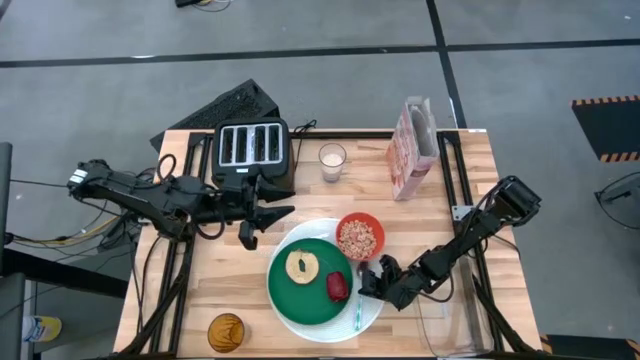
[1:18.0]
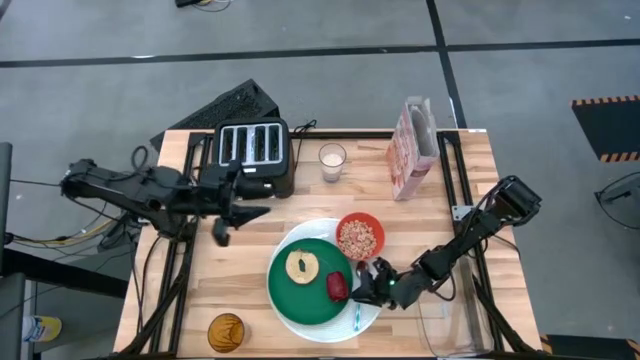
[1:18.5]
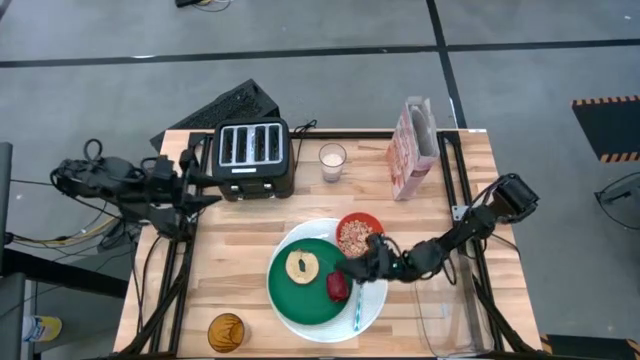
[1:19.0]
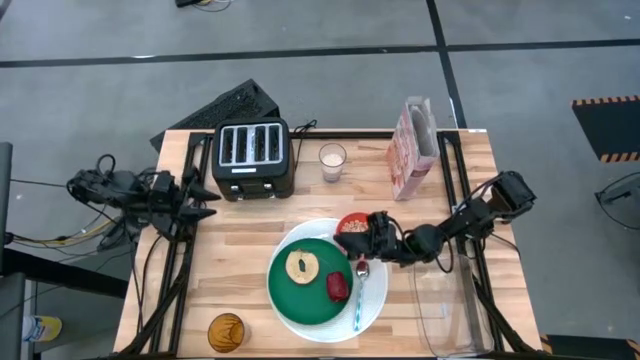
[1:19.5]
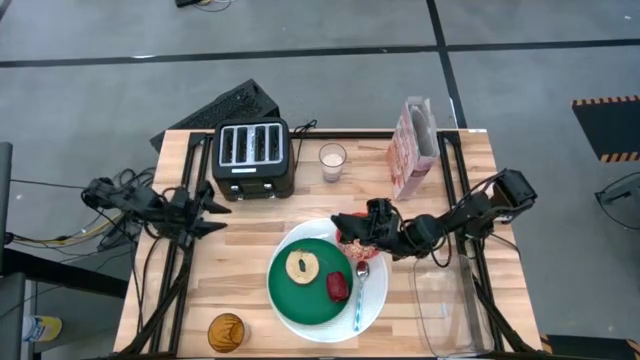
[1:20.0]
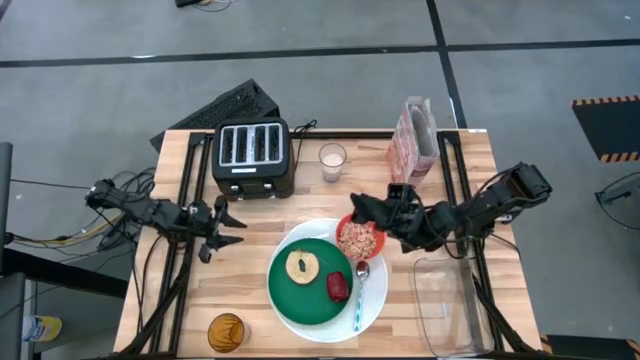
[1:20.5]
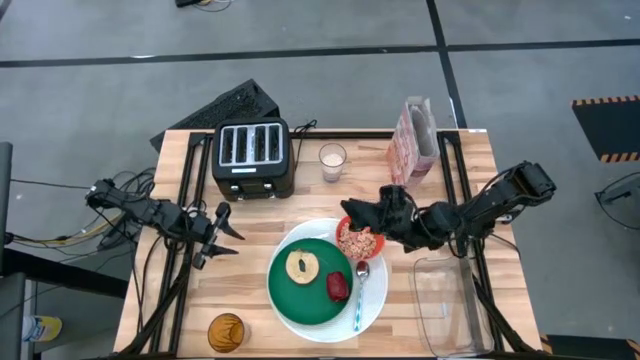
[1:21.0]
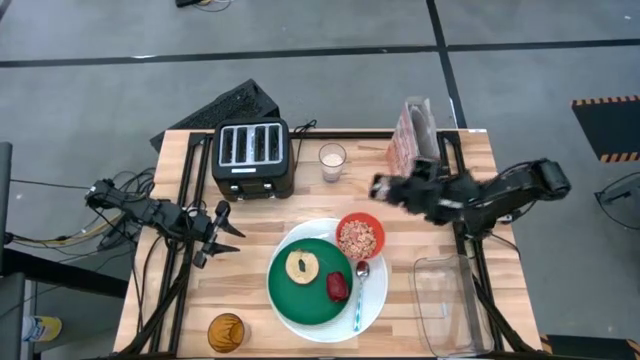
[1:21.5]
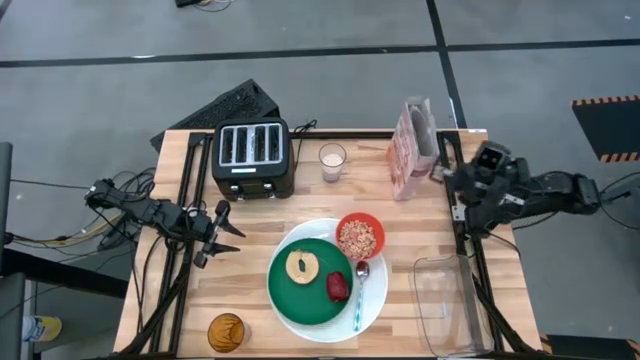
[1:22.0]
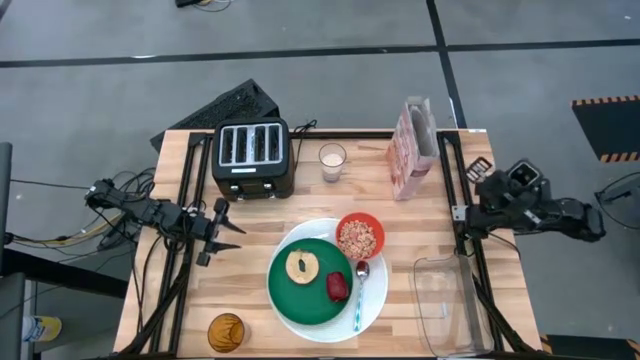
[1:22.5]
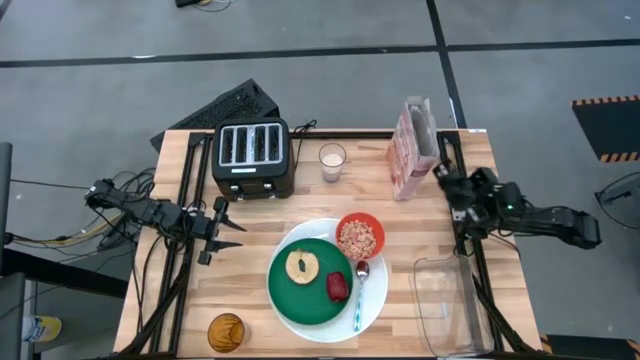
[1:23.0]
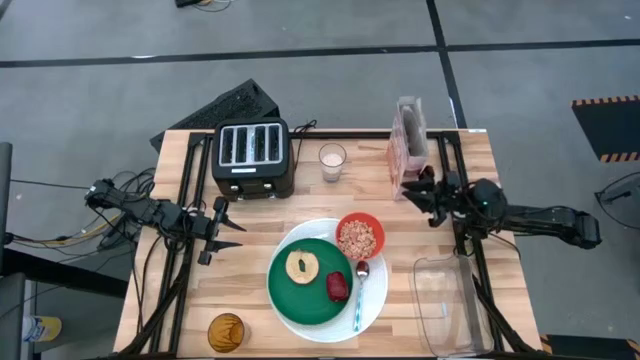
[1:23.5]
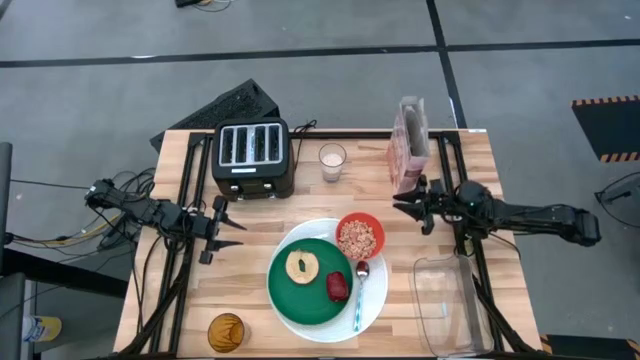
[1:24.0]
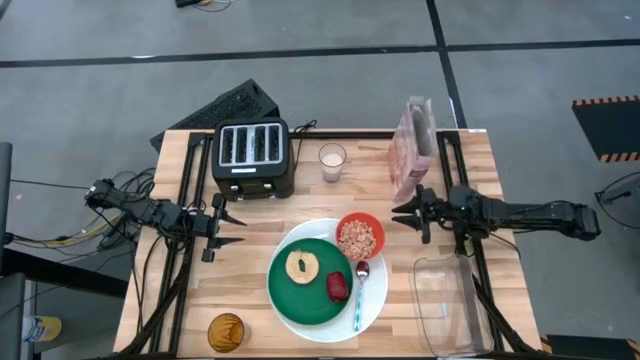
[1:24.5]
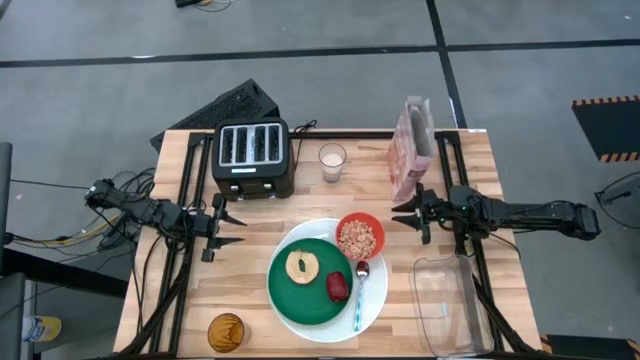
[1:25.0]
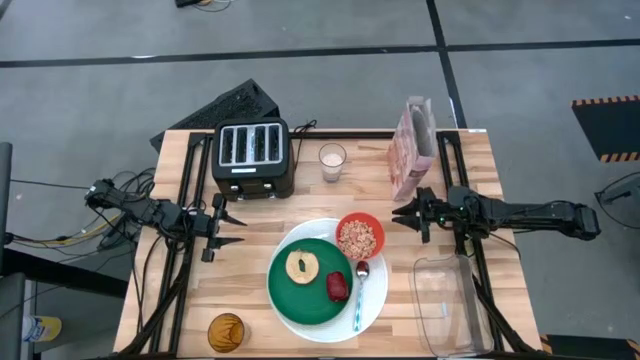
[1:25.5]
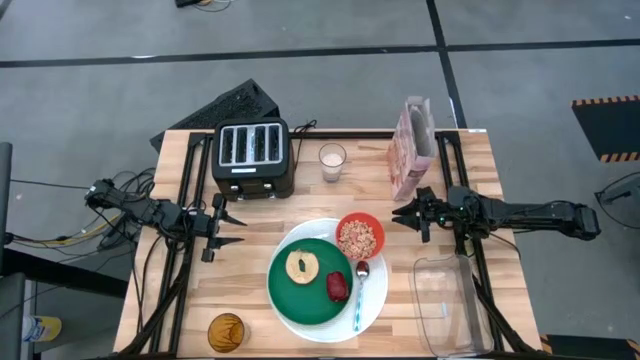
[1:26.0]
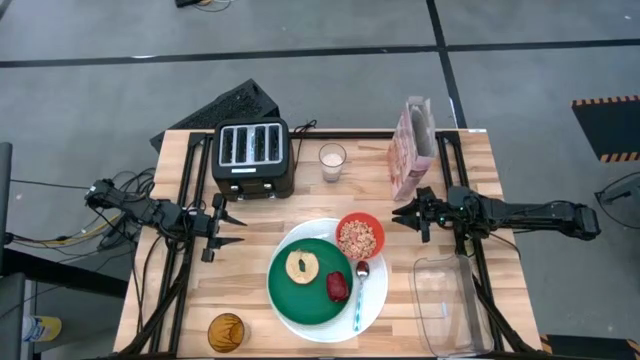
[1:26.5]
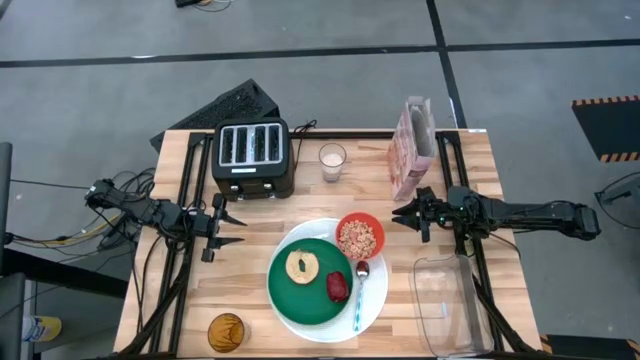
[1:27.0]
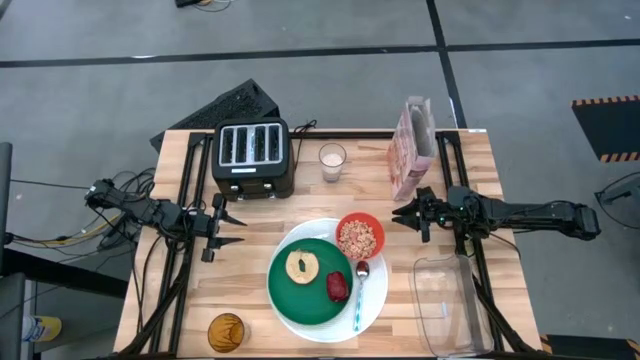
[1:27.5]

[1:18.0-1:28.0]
Task: Arrange a breakfast setting
Return to Home Position

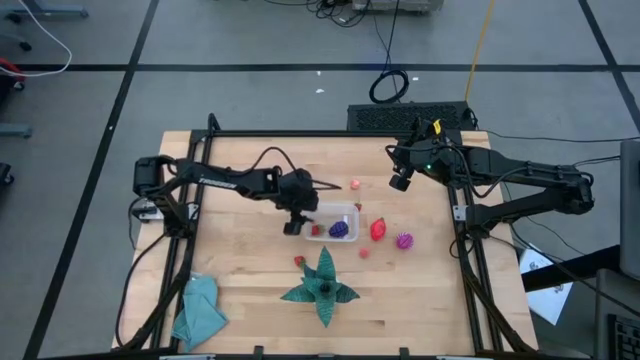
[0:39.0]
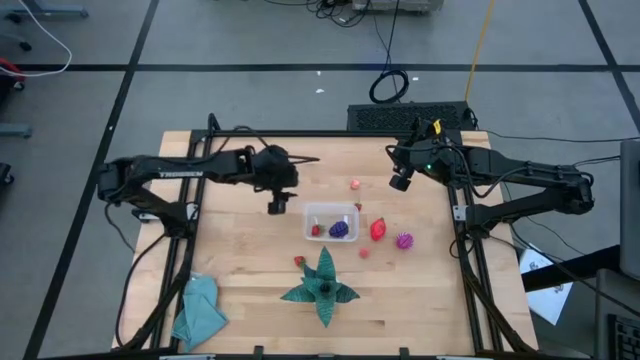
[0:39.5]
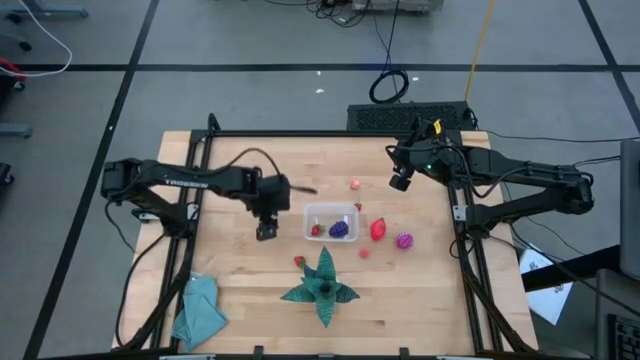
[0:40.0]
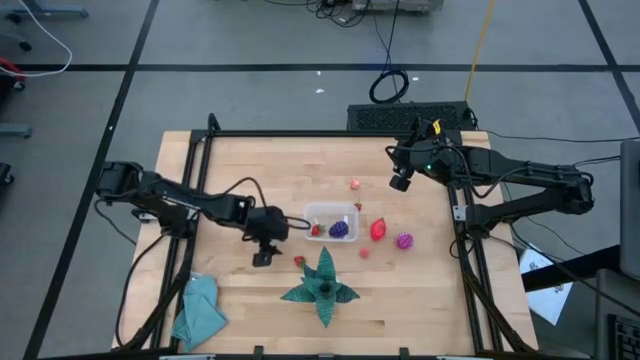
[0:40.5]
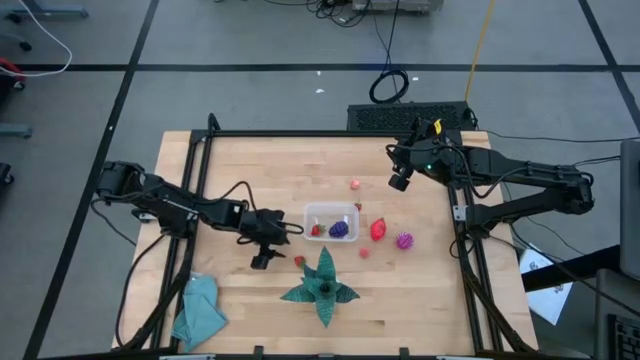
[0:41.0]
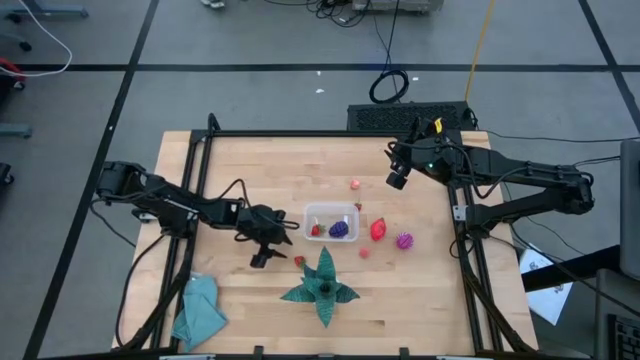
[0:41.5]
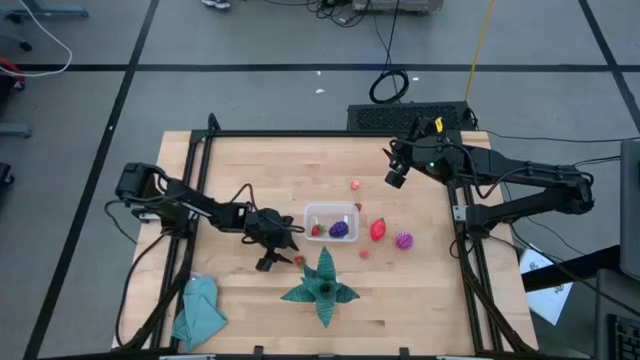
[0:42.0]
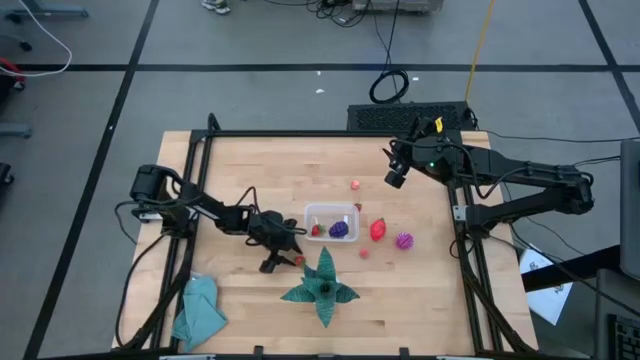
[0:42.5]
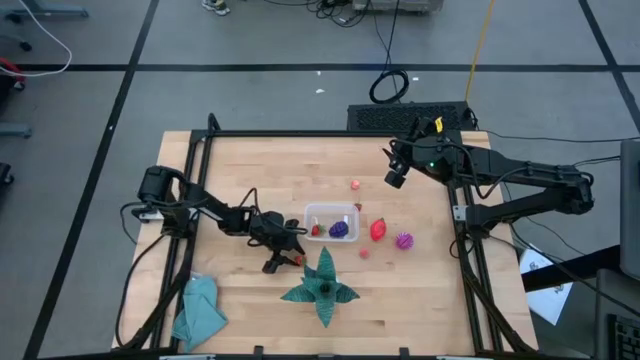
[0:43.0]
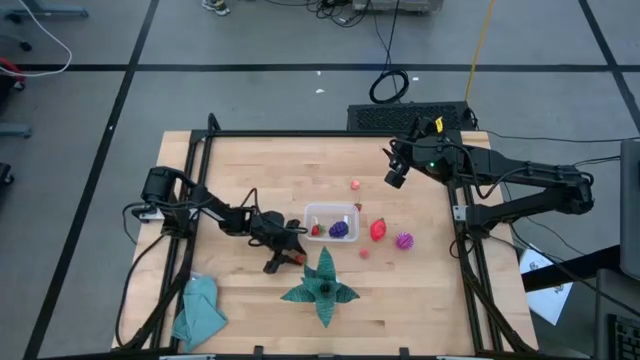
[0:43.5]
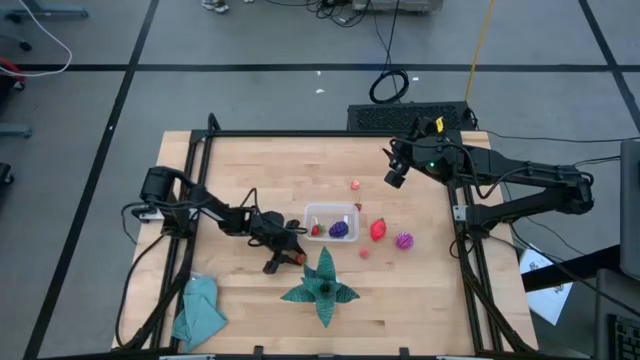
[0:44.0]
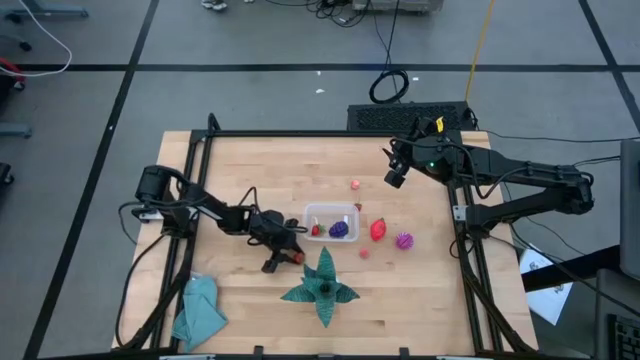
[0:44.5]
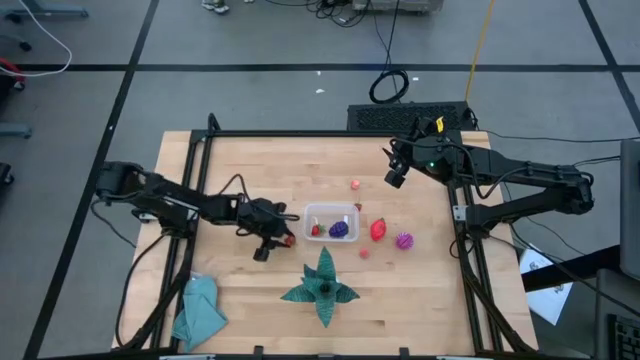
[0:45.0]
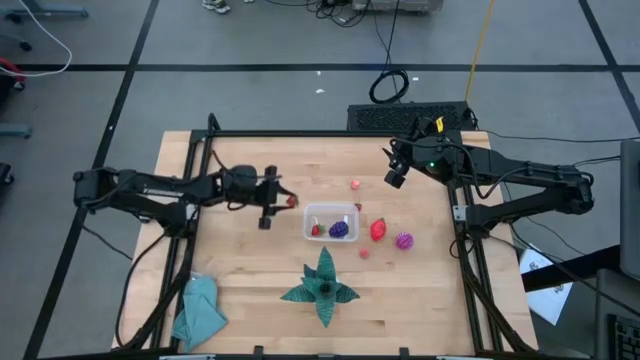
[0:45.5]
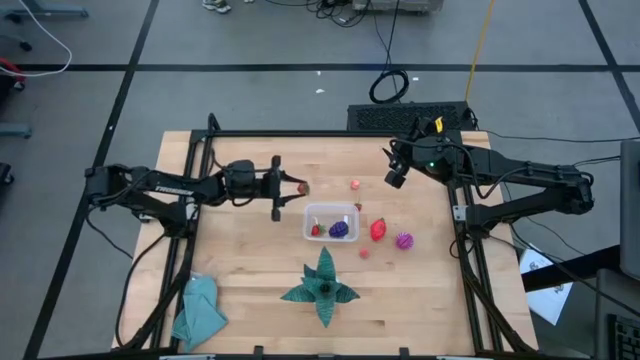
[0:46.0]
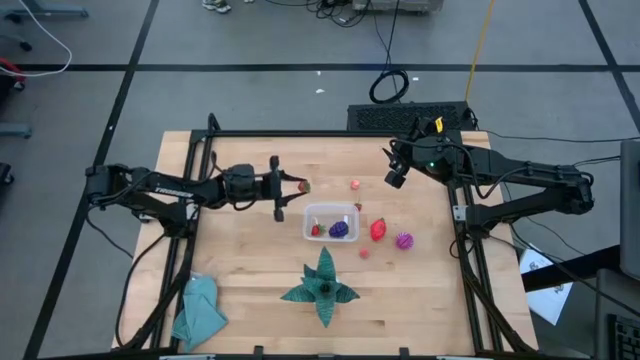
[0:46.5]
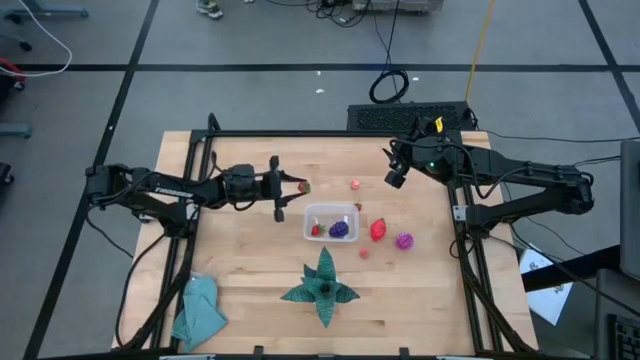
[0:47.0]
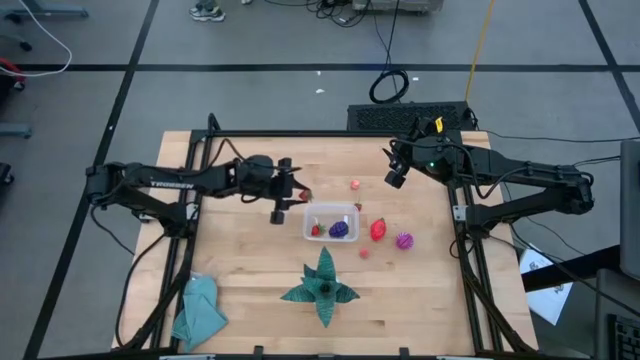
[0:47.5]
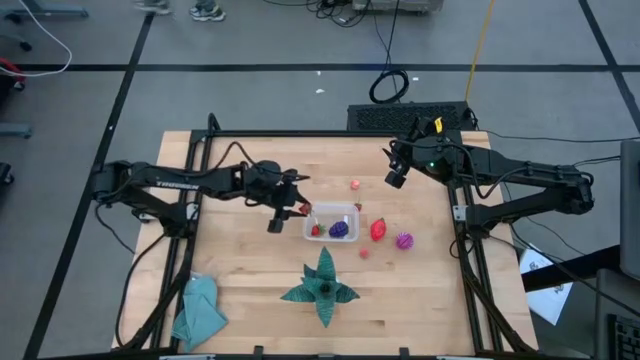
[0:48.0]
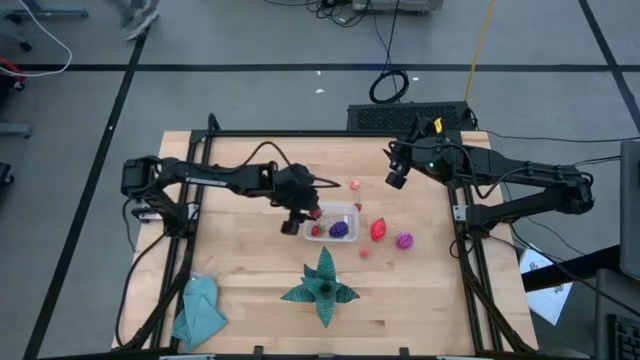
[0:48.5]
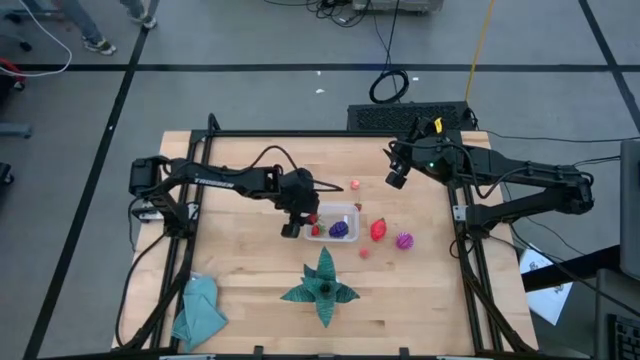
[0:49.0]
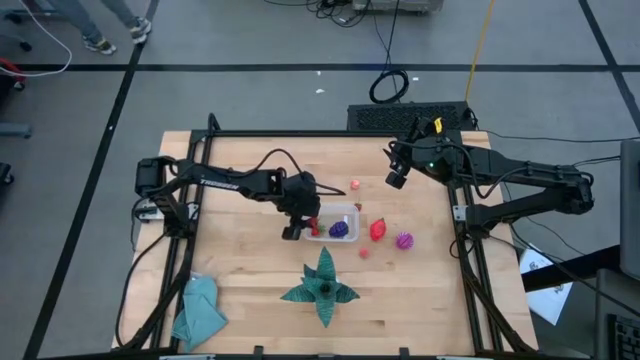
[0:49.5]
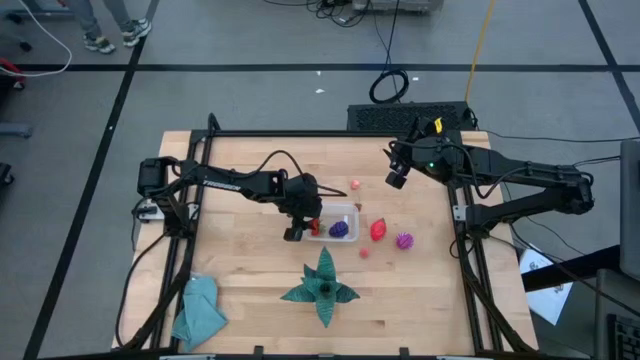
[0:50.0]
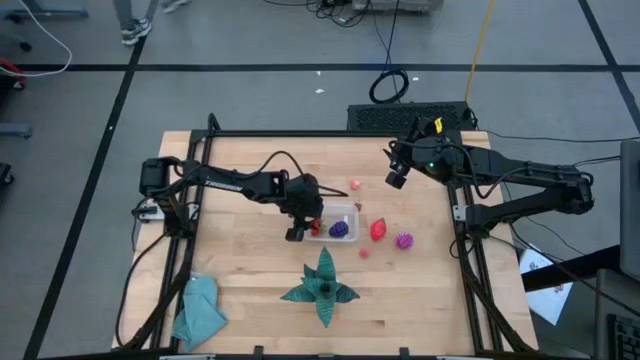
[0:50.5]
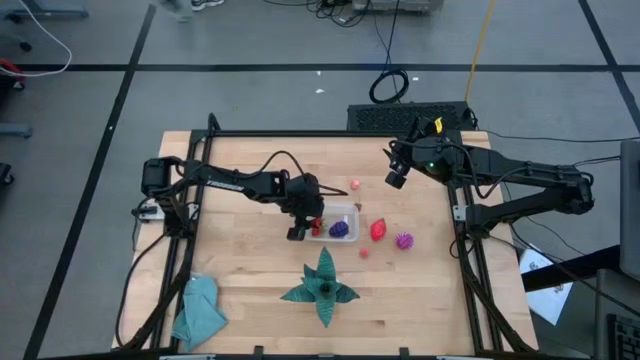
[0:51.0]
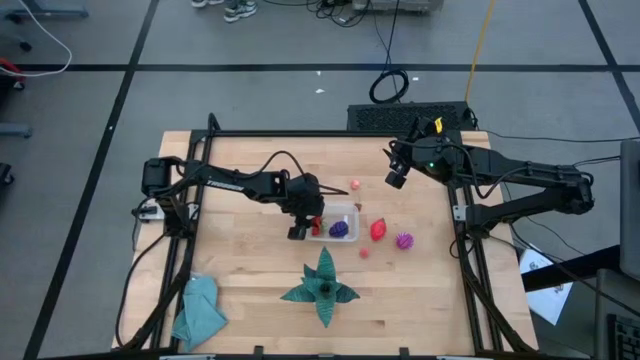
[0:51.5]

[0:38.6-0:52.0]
Task: Pick and placing Produce into tupperware
Put the red strawberry into the transparent bin
